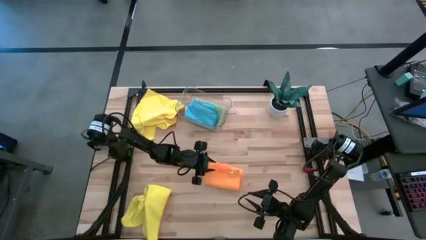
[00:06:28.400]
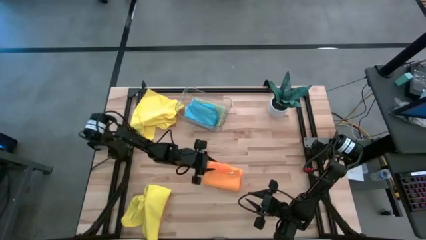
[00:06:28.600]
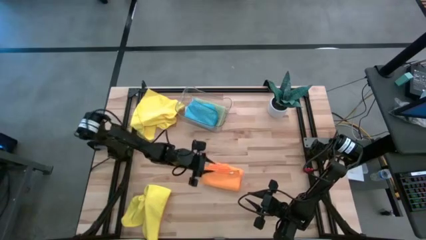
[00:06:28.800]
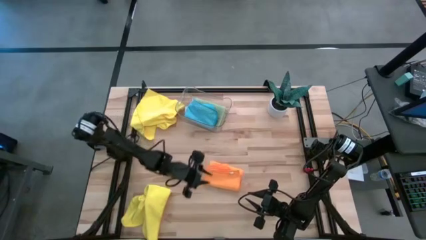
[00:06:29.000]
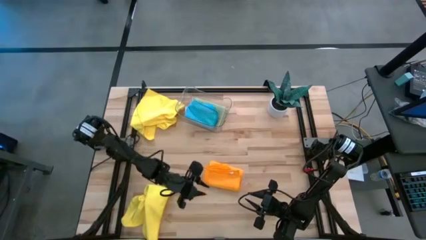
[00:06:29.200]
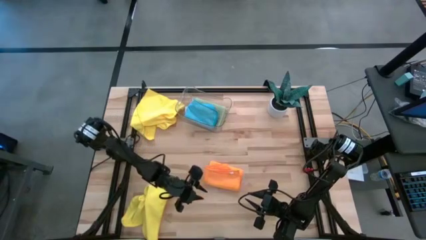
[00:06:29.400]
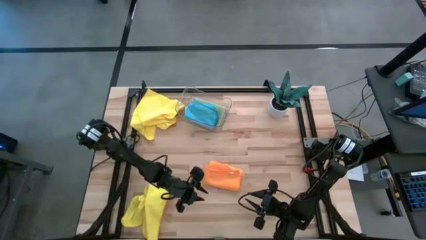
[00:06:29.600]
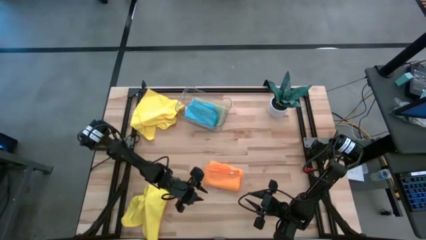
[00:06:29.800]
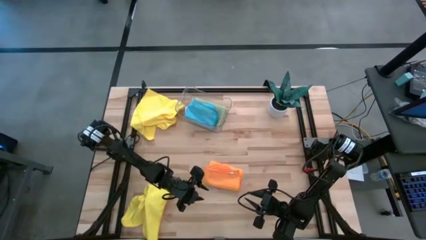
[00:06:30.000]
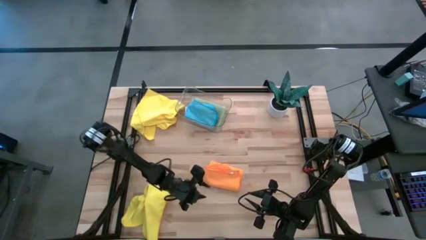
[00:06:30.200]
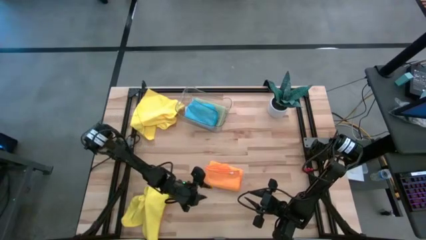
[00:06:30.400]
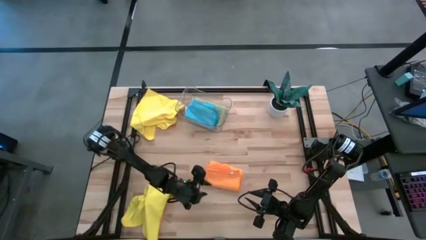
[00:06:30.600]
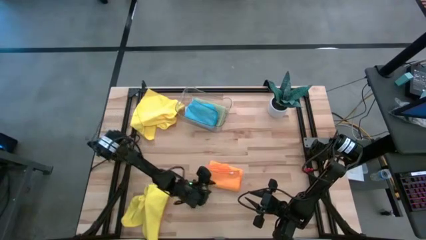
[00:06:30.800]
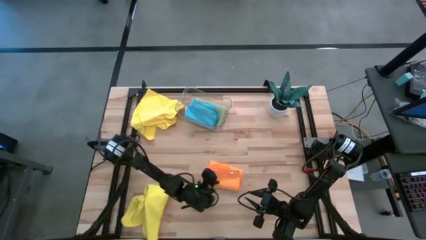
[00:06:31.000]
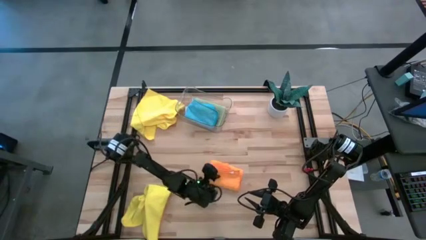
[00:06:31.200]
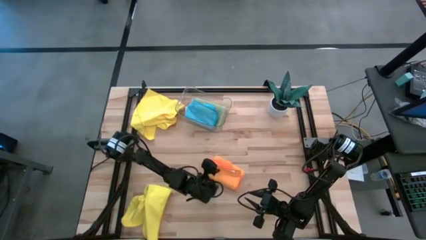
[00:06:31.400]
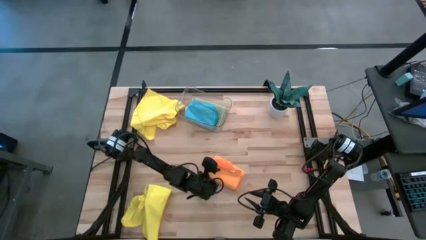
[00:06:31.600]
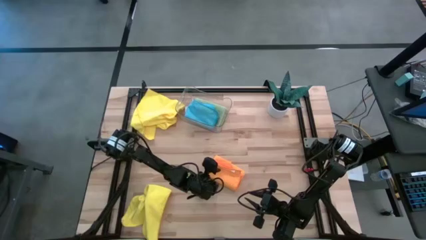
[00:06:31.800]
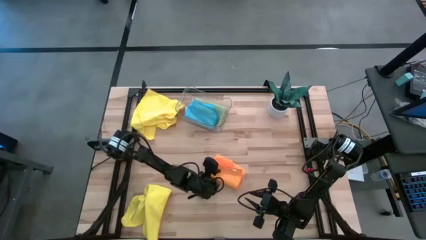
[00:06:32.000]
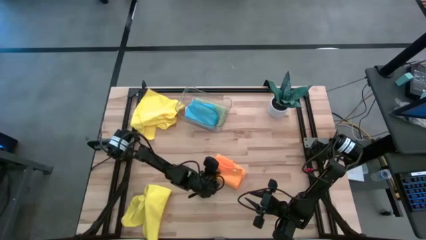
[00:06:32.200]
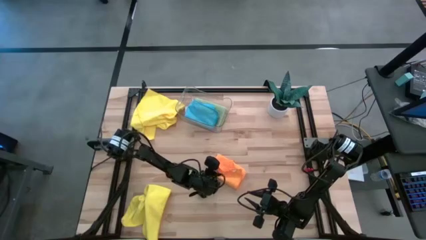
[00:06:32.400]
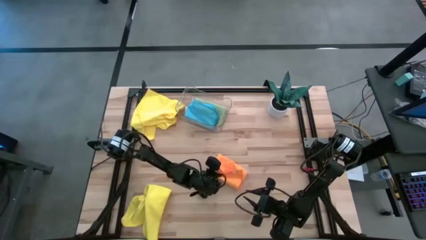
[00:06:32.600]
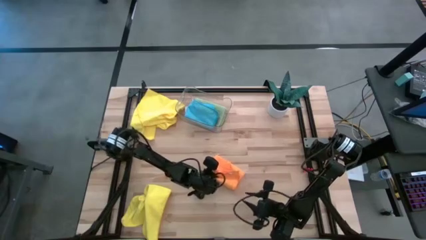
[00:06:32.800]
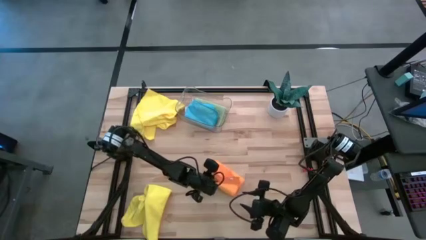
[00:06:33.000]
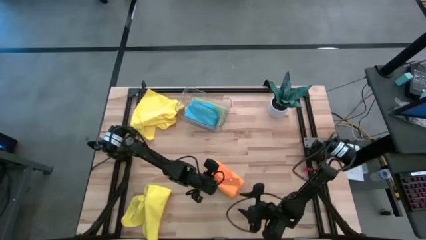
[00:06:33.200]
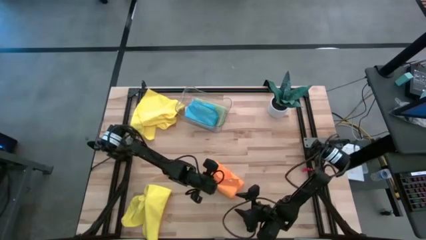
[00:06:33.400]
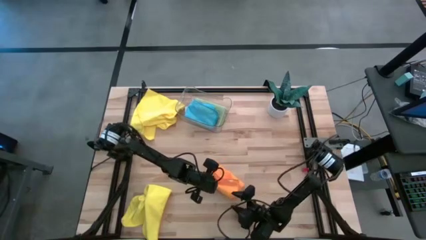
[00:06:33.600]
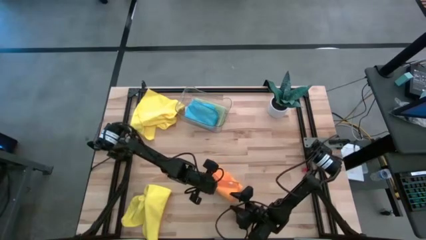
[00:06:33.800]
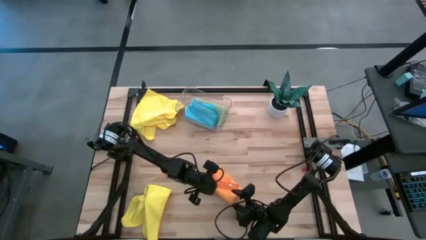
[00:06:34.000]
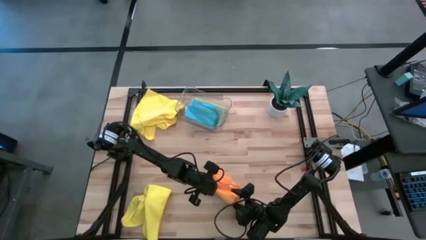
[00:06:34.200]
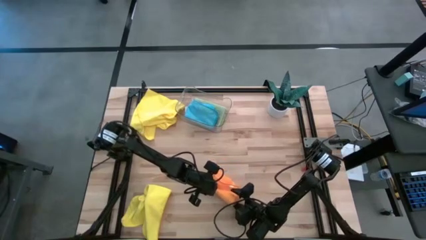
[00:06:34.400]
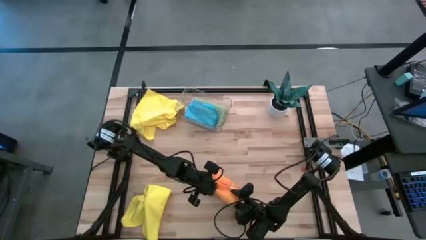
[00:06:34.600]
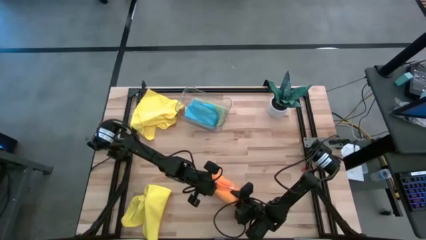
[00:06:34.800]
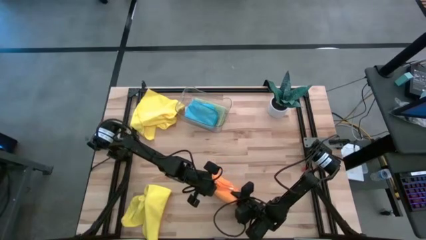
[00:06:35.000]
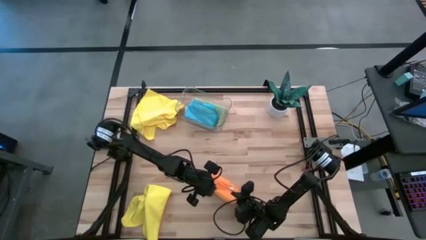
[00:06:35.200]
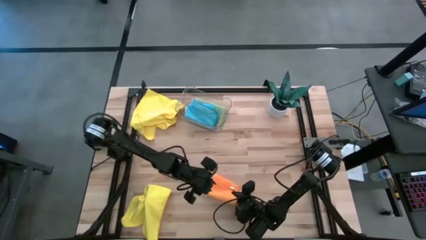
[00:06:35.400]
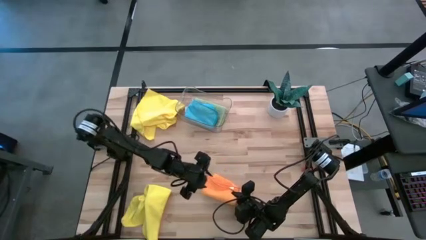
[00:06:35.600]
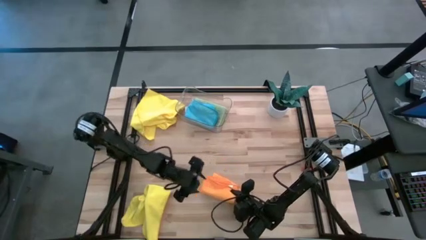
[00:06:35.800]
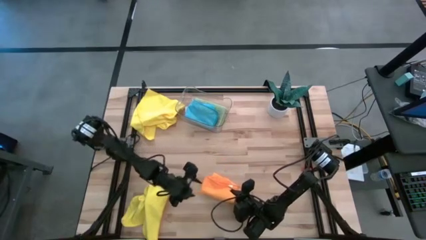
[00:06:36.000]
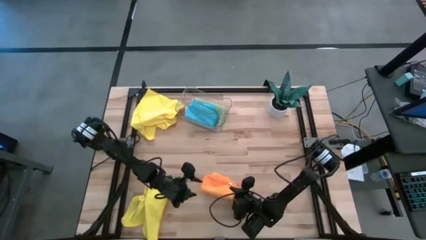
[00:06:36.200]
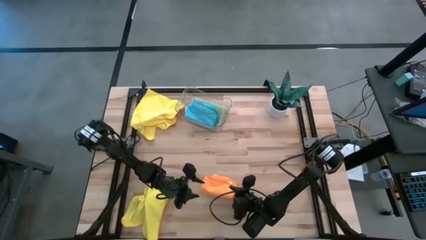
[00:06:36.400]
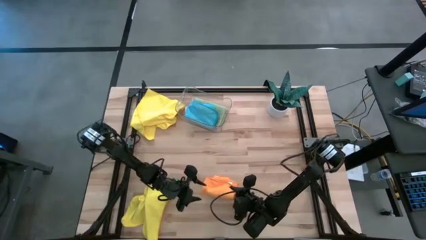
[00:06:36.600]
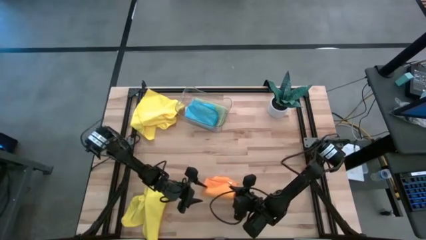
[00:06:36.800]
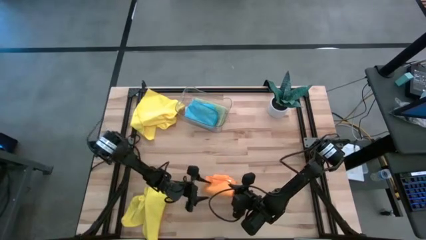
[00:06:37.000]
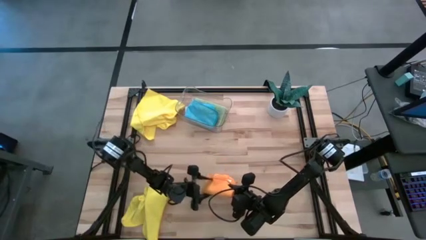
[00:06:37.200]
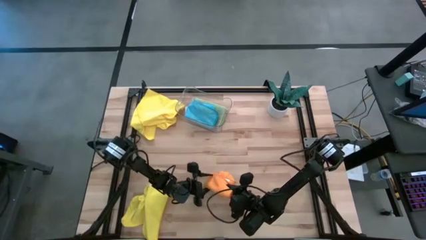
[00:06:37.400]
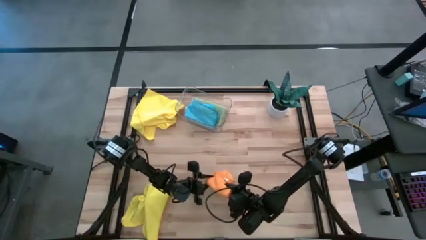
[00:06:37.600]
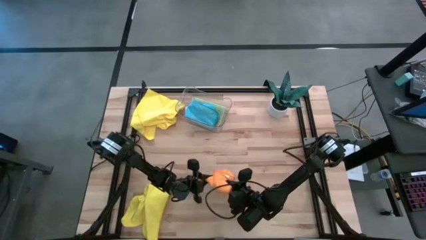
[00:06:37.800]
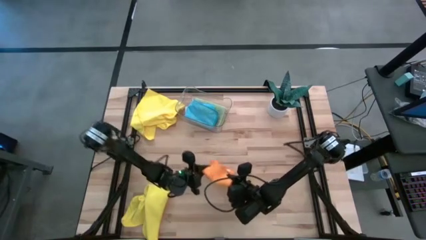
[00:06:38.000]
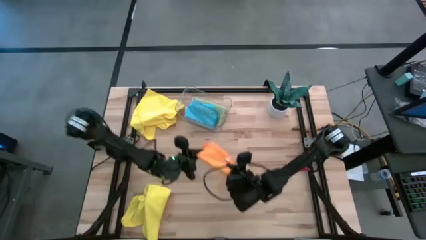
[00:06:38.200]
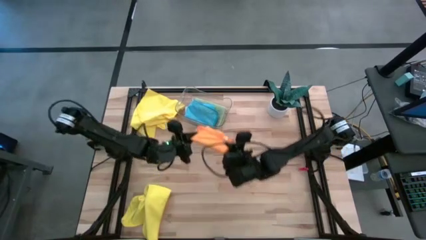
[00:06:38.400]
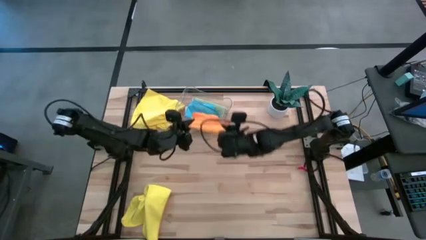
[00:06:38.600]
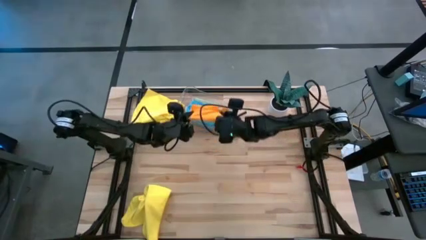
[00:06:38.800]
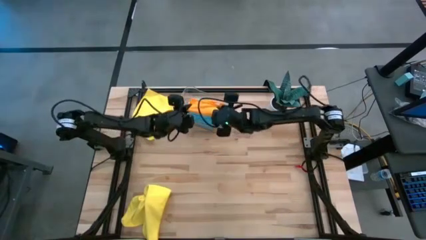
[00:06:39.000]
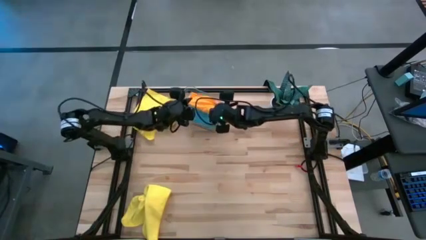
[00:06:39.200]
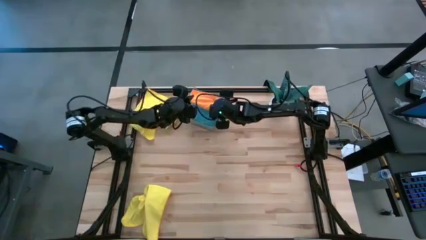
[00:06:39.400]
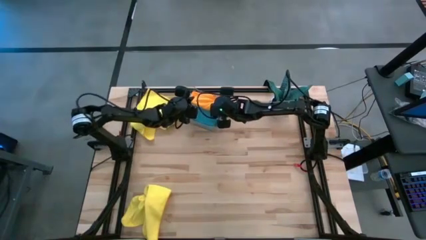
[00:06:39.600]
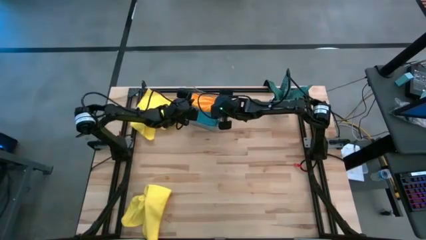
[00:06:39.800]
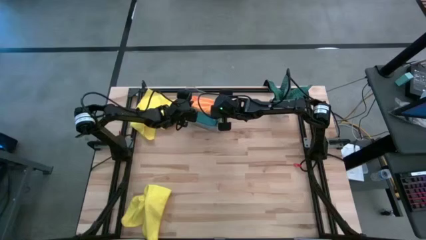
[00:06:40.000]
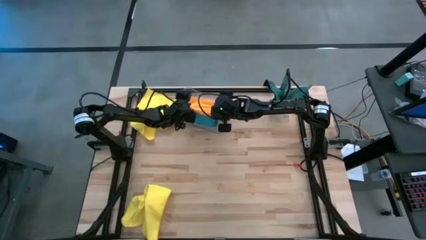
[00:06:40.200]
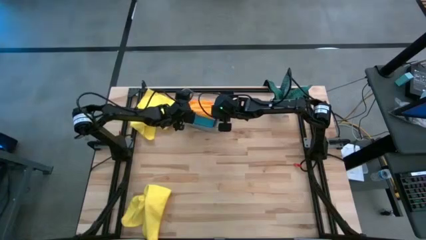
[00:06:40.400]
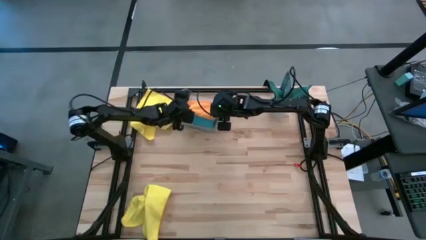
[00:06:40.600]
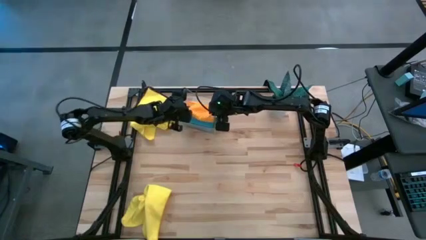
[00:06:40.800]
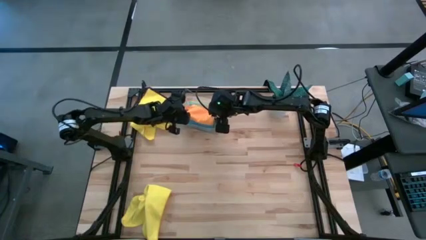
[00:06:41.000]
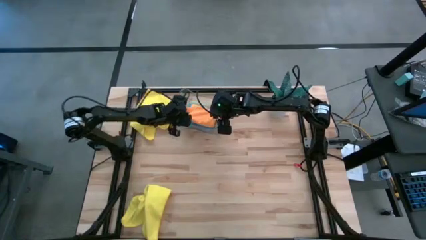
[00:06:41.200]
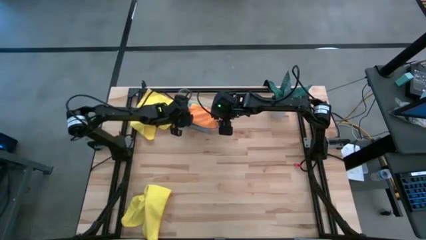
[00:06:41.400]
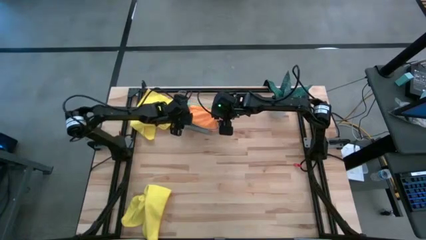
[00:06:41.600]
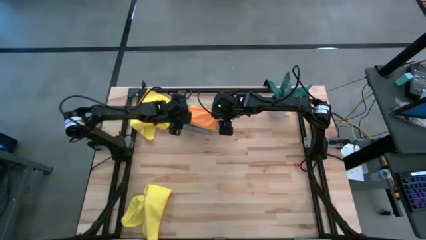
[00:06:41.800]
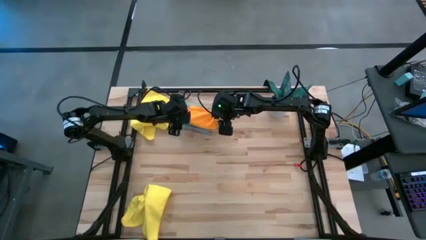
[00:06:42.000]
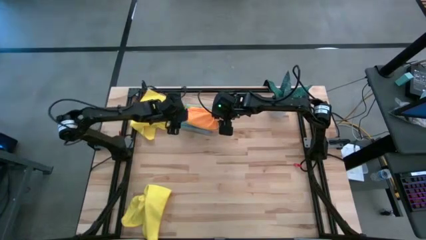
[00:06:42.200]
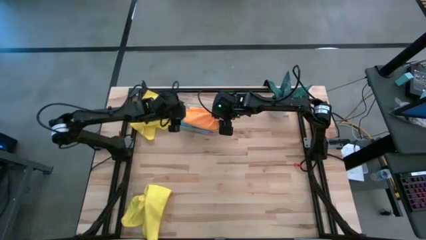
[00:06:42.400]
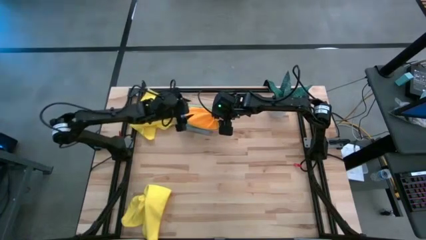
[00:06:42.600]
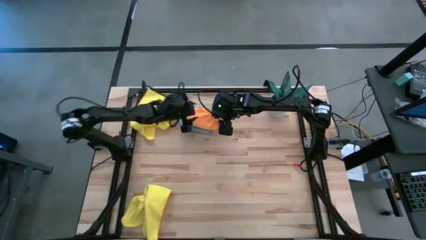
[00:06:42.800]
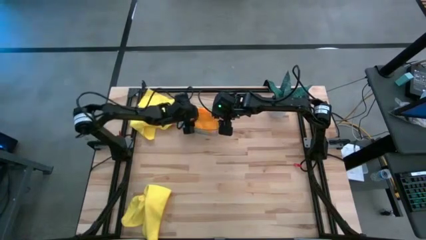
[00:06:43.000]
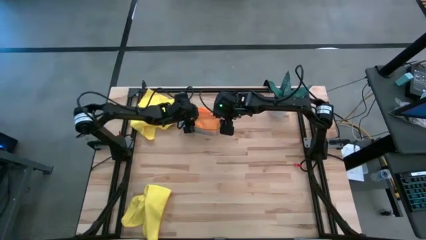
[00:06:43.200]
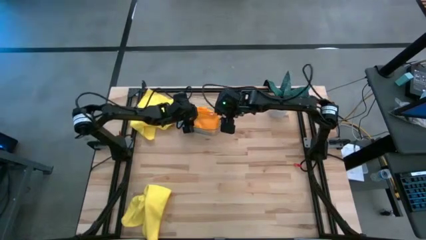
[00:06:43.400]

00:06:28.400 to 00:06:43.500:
Task: Fold microfiber towels
Put the orange folded towel into the transparent bin

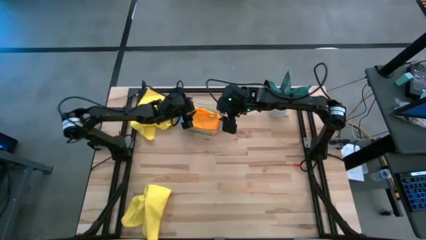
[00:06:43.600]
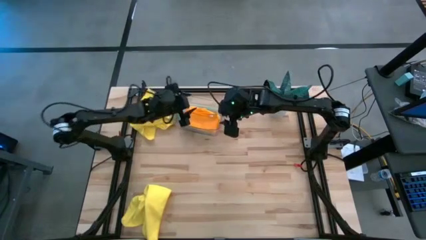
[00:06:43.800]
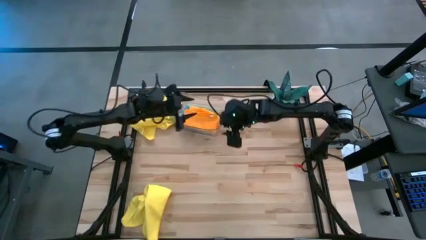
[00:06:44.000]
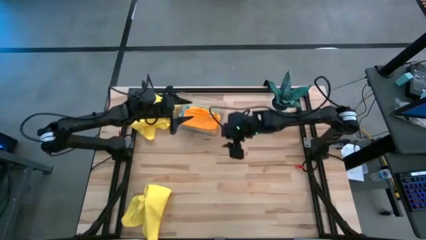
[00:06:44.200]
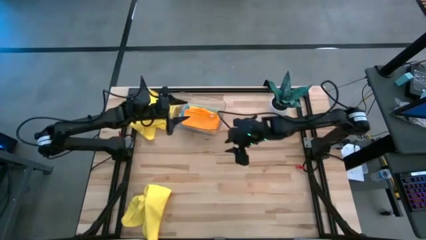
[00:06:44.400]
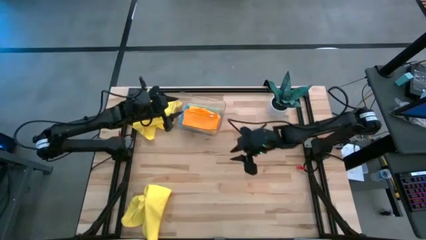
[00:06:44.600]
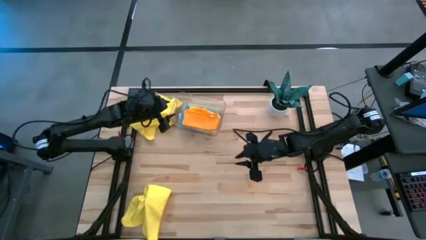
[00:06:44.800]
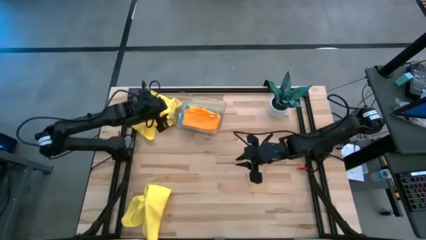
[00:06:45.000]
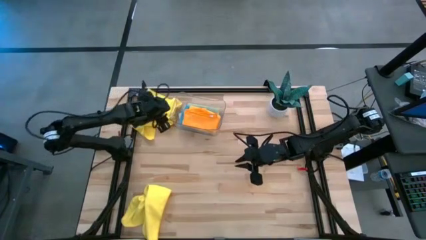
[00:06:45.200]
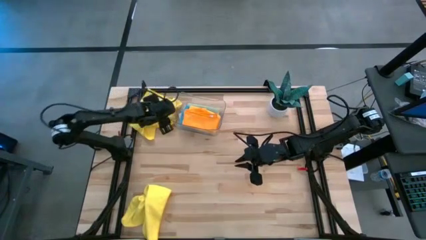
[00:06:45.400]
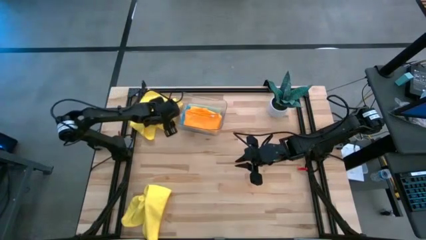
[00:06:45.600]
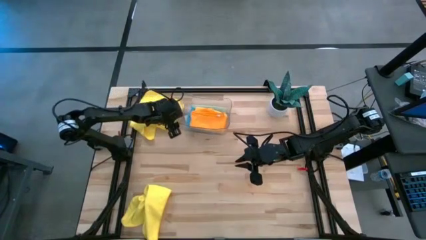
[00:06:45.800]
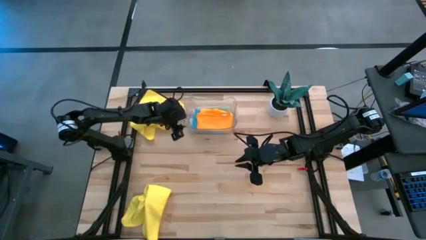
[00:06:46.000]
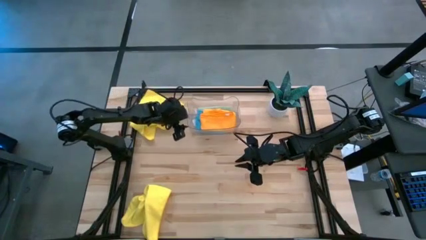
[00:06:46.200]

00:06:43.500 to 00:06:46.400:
Adjust the transparent bin
